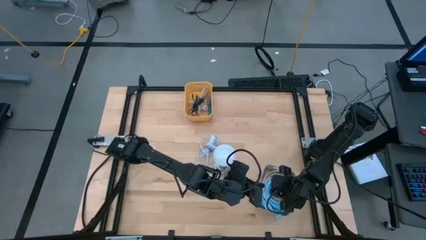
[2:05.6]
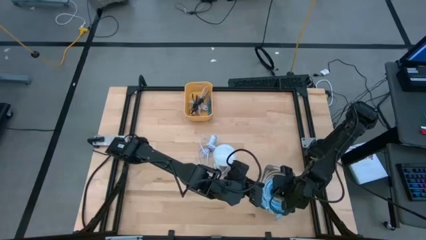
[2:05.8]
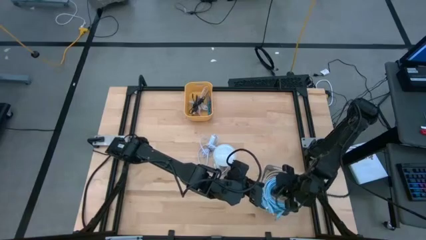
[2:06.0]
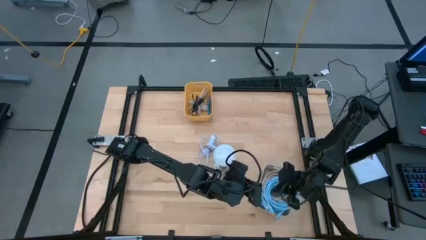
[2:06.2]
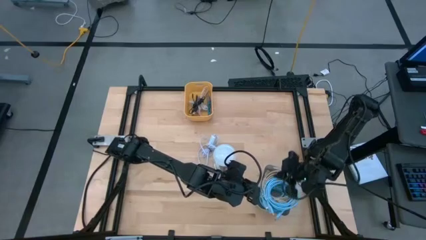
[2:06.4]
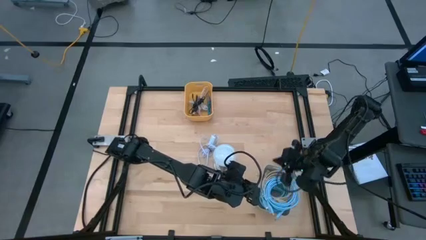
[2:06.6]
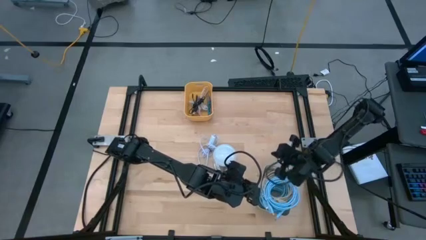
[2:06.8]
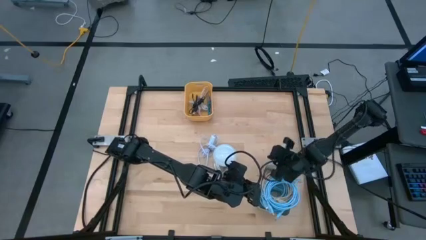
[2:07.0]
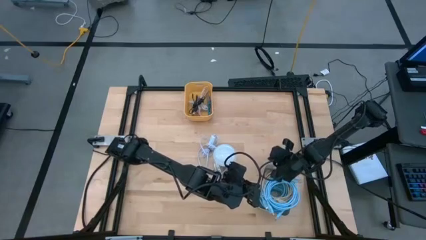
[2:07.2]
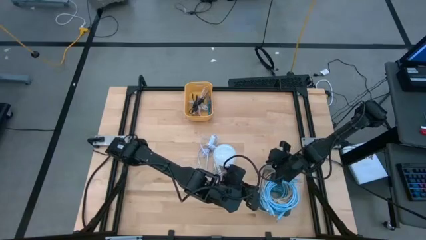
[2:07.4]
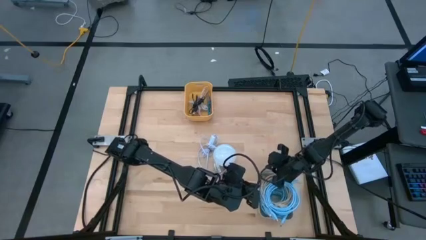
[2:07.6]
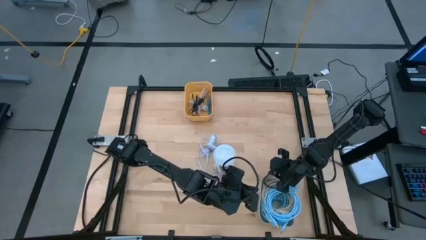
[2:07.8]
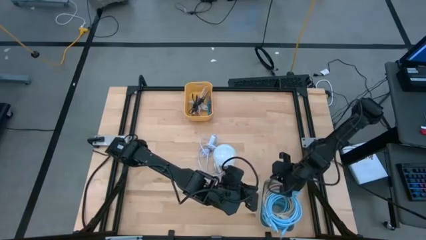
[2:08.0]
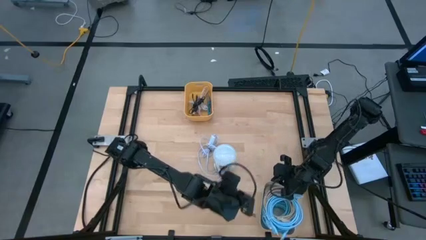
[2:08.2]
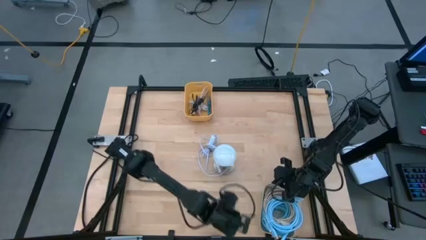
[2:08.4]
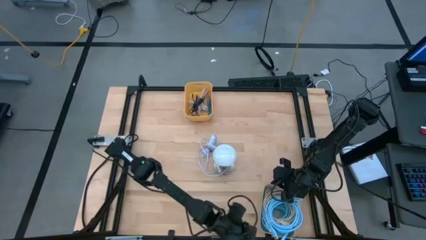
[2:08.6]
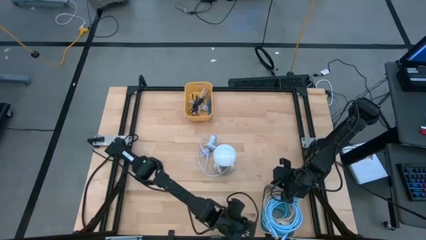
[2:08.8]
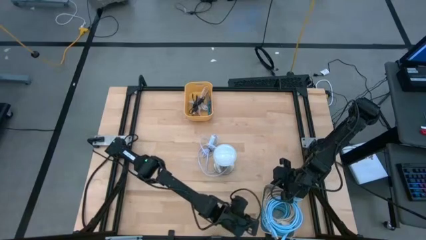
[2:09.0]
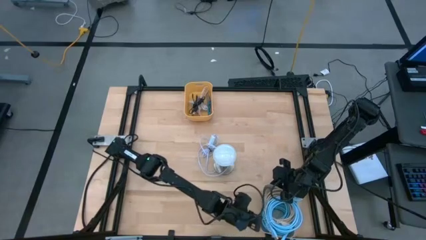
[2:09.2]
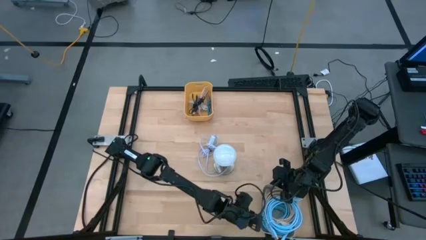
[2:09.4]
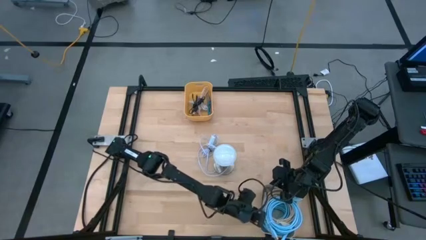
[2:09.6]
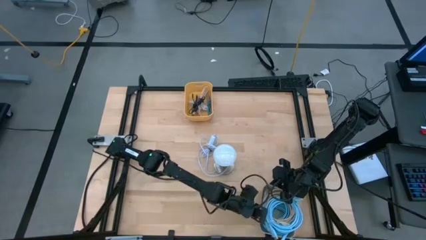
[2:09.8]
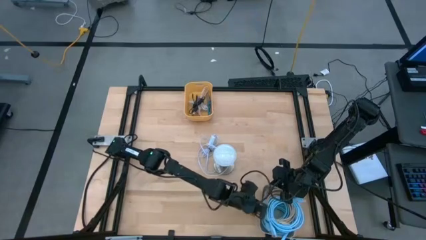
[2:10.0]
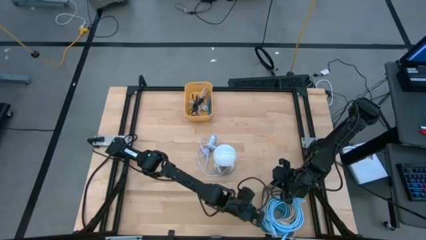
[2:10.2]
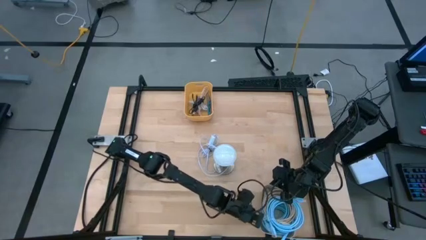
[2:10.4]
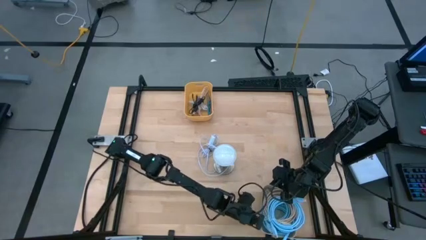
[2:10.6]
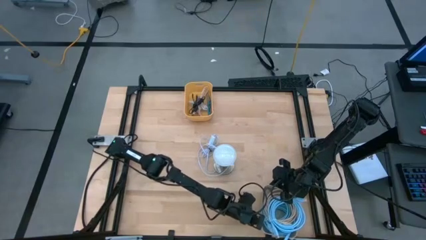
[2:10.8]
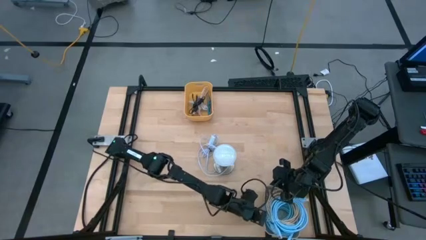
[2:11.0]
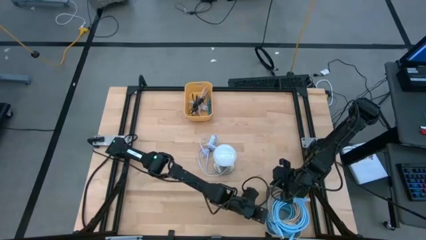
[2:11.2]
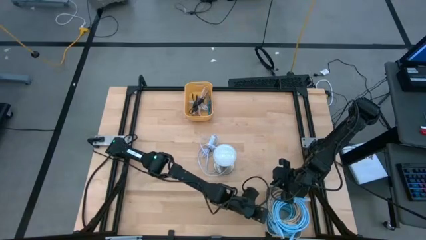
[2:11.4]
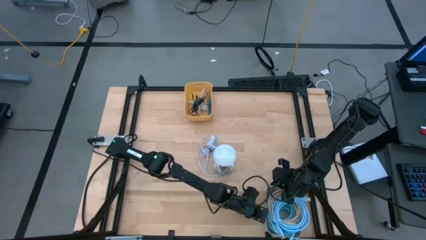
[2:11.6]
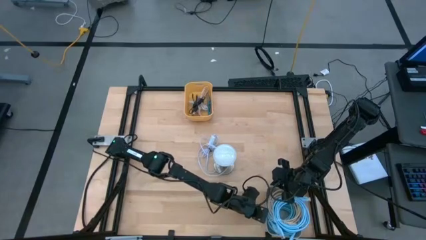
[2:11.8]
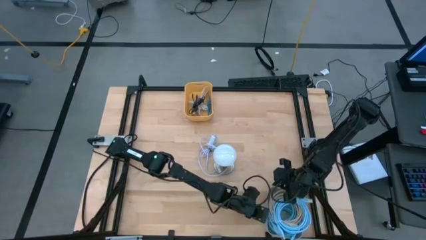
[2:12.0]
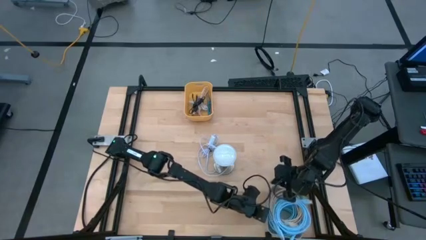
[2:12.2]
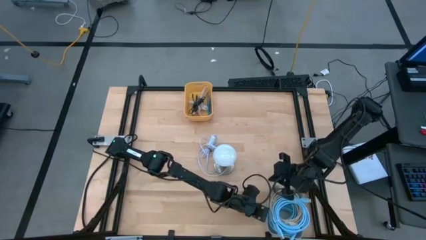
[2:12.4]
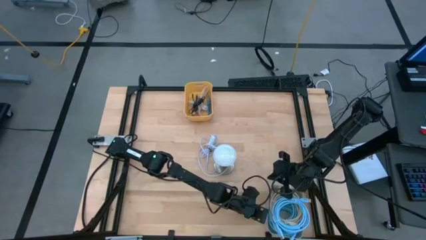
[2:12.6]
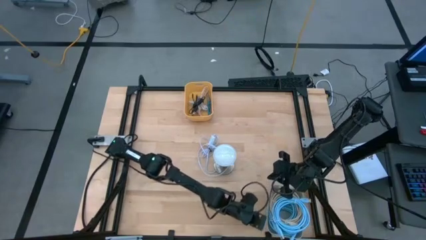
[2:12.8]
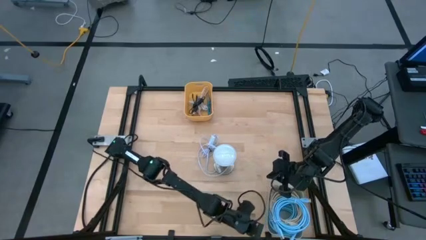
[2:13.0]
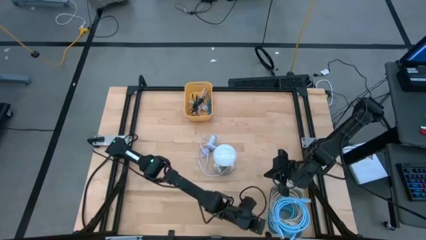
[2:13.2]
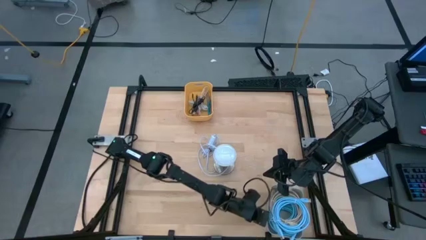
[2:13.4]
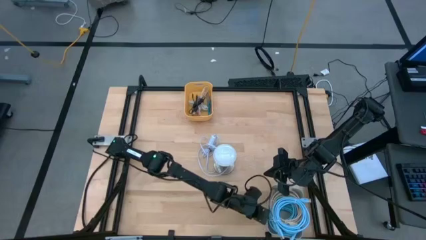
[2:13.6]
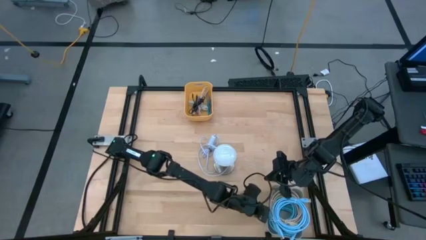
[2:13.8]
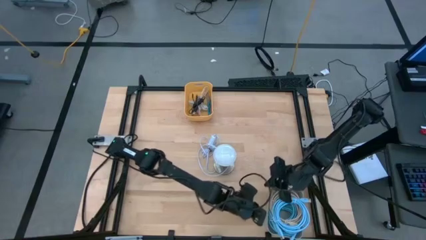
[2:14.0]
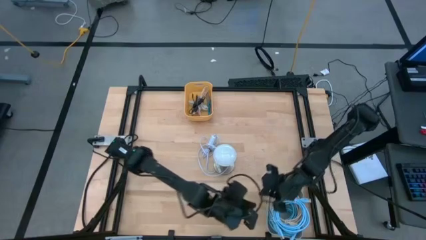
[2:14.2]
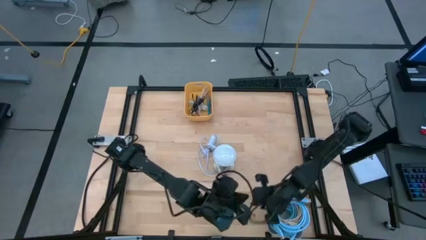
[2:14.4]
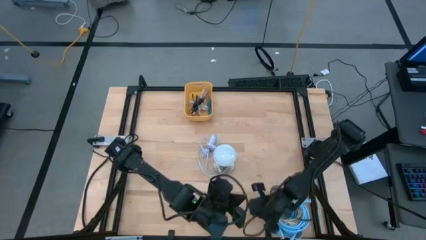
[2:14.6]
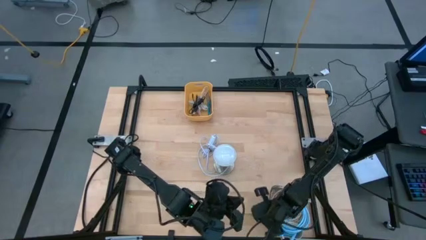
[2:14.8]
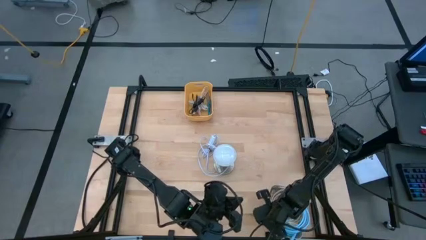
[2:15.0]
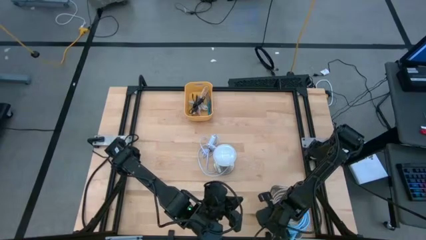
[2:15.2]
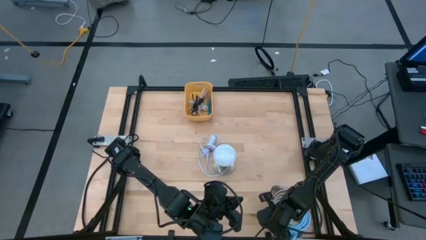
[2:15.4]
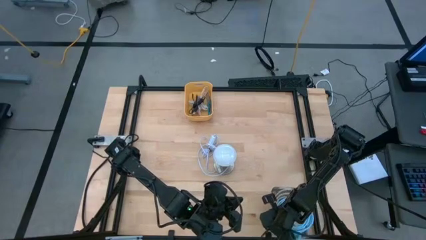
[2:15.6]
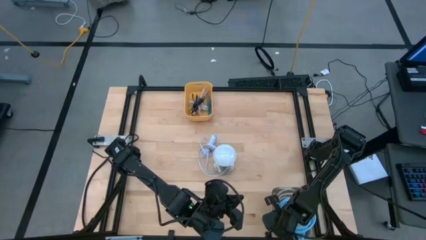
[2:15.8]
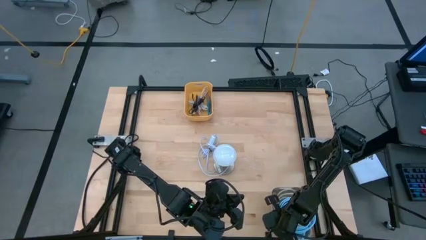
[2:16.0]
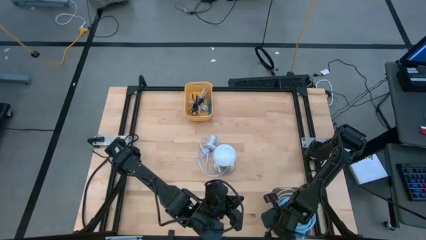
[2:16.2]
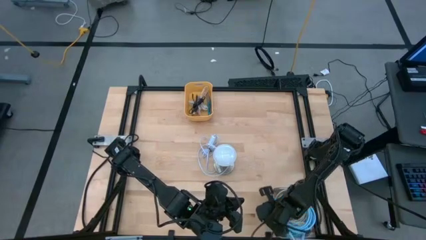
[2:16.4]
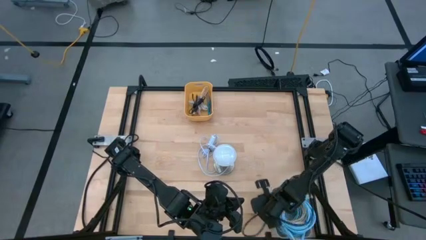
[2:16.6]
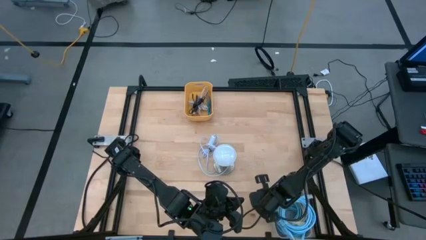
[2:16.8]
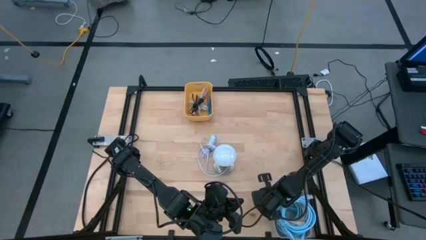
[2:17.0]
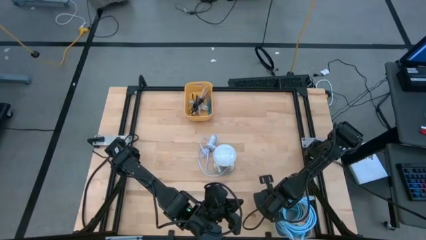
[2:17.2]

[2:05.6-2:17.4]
Task: Pick & Place USB Port
Adjust the gray bin
